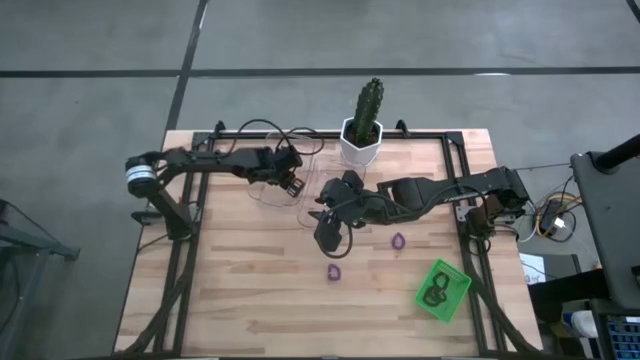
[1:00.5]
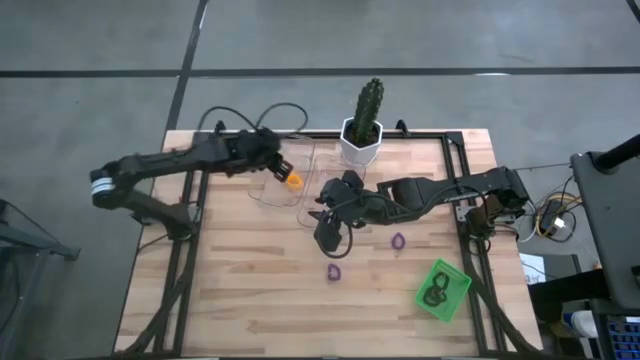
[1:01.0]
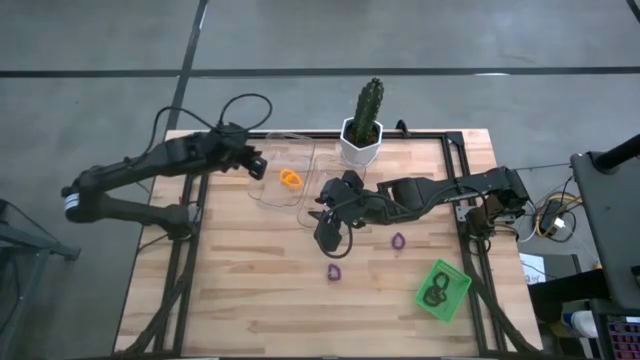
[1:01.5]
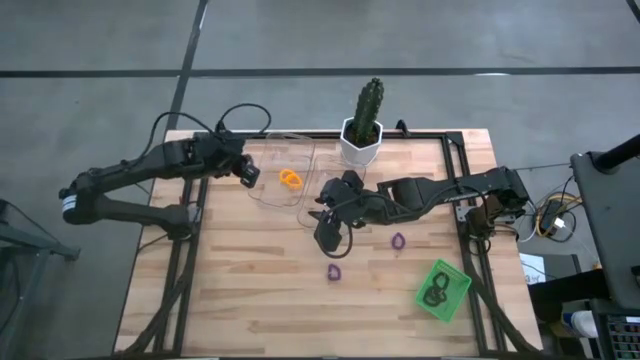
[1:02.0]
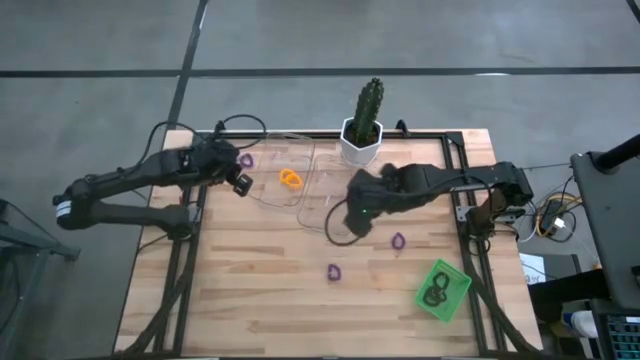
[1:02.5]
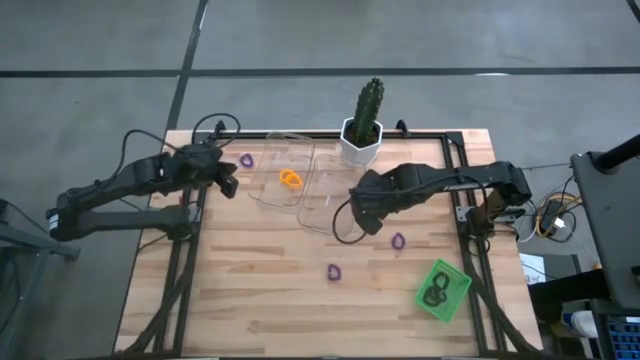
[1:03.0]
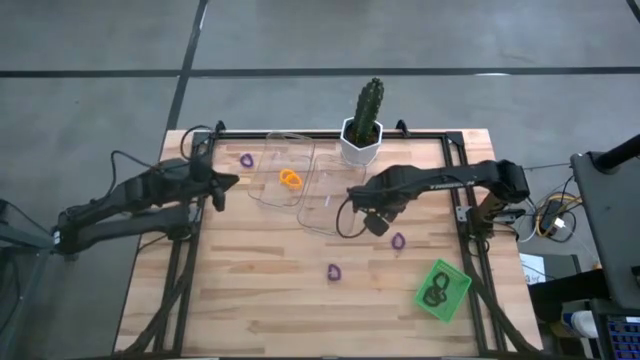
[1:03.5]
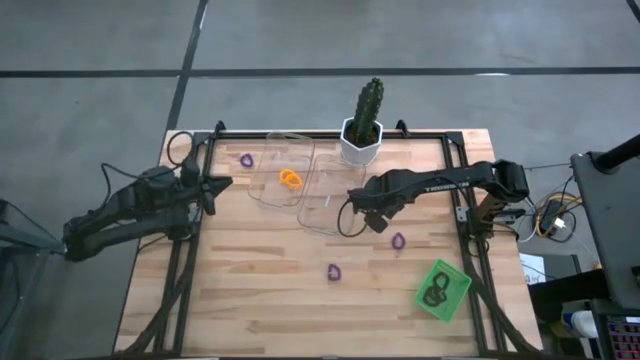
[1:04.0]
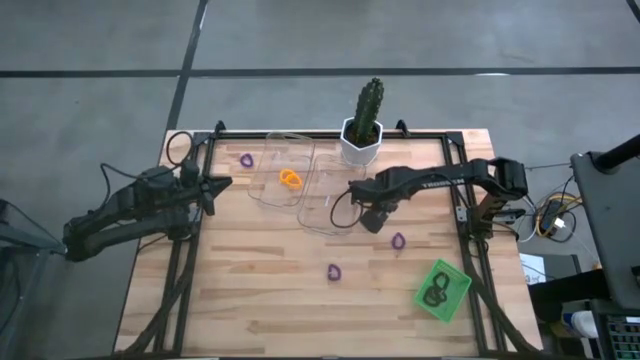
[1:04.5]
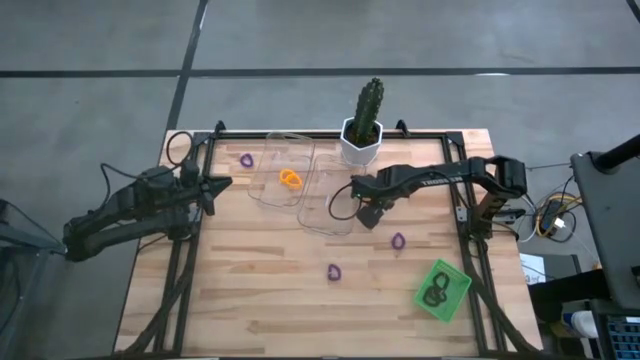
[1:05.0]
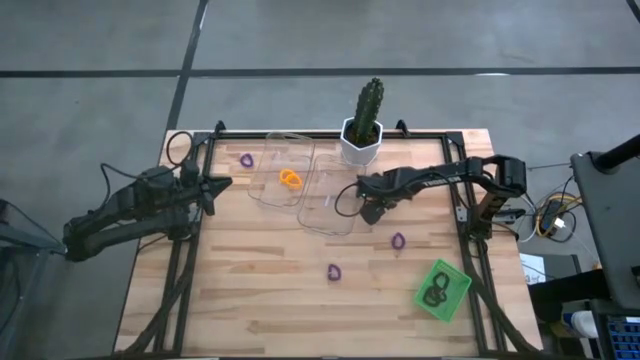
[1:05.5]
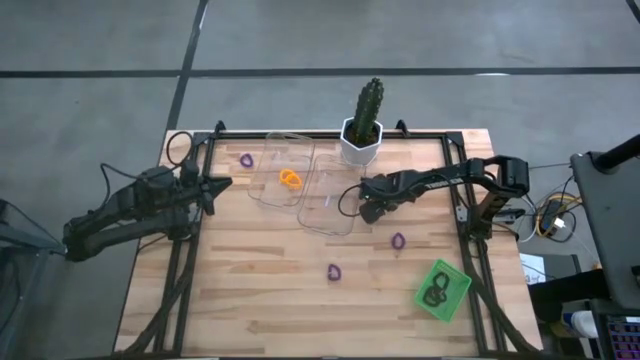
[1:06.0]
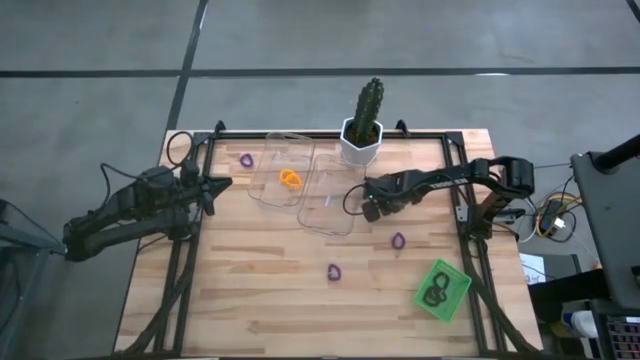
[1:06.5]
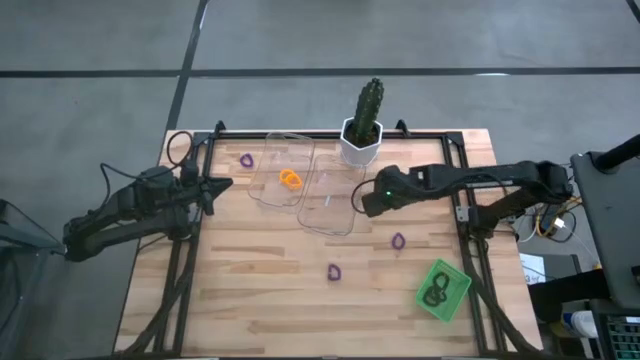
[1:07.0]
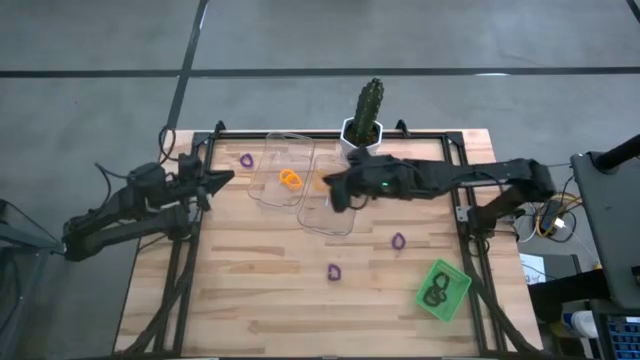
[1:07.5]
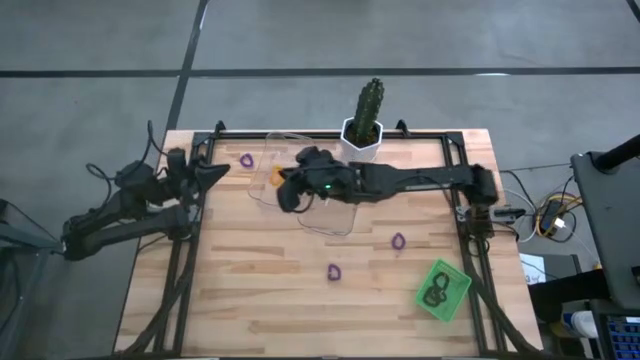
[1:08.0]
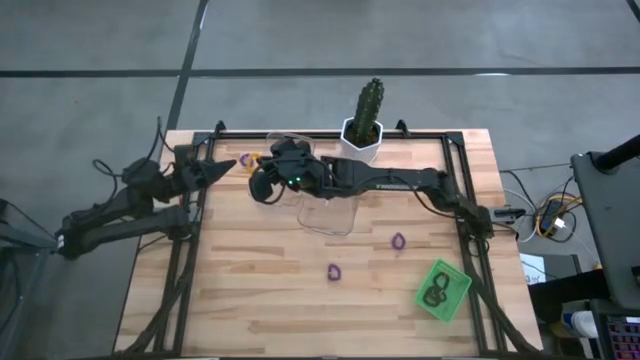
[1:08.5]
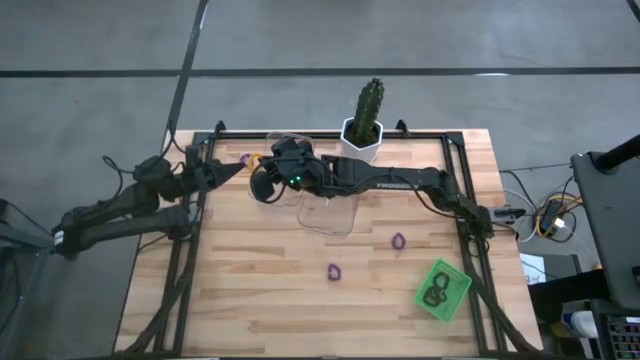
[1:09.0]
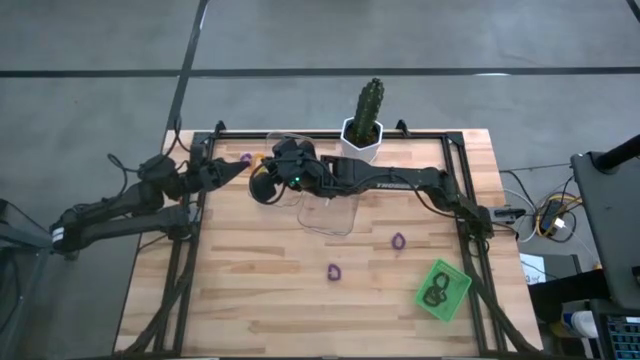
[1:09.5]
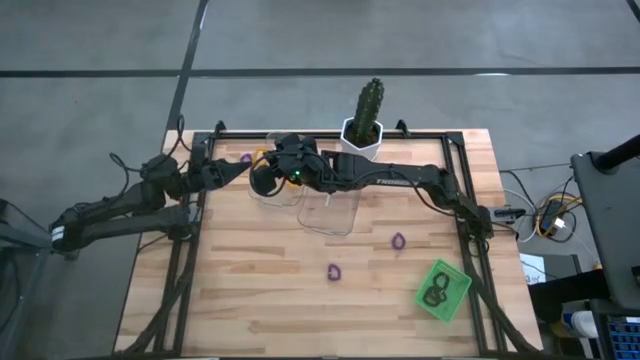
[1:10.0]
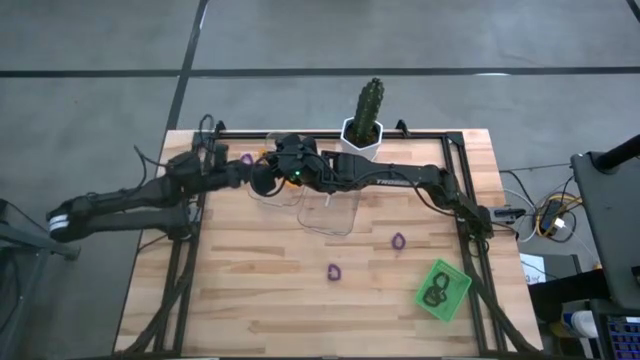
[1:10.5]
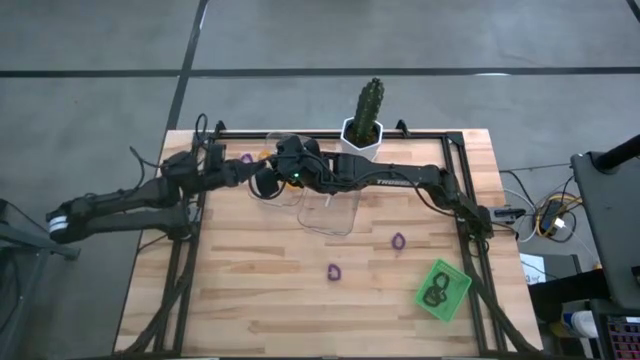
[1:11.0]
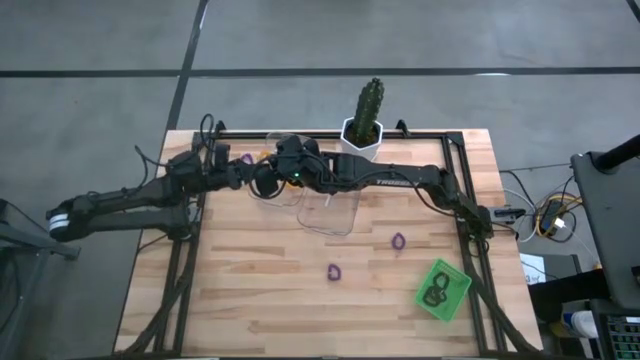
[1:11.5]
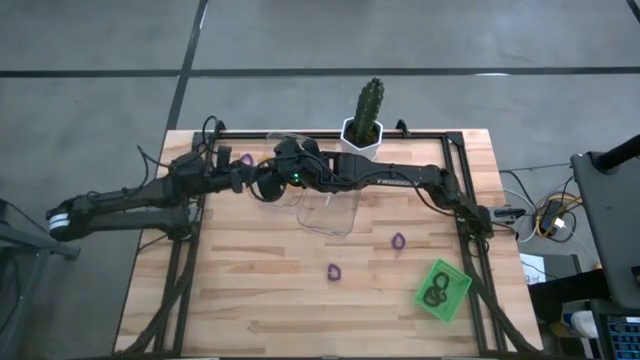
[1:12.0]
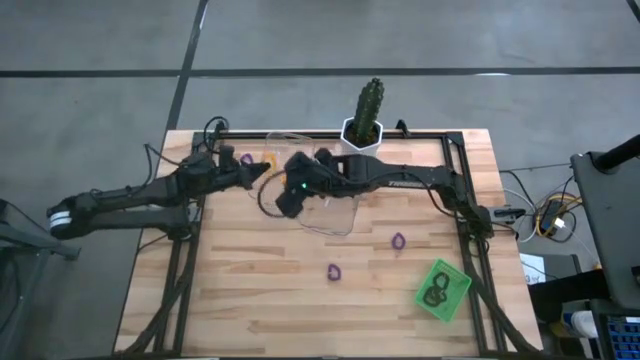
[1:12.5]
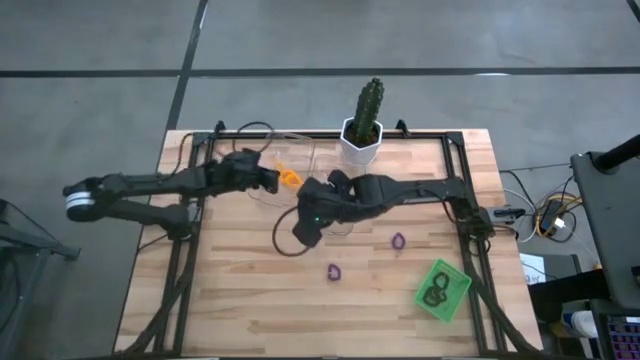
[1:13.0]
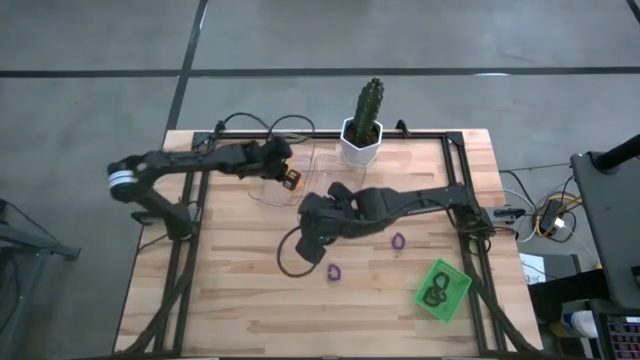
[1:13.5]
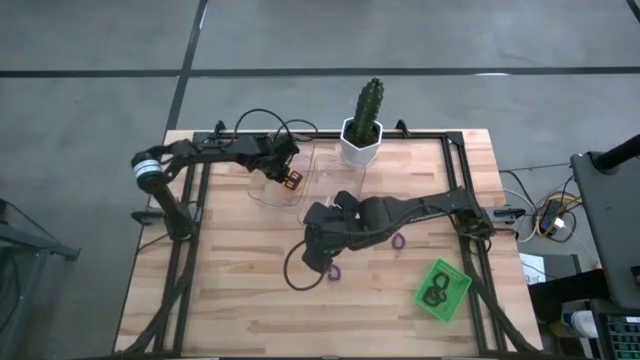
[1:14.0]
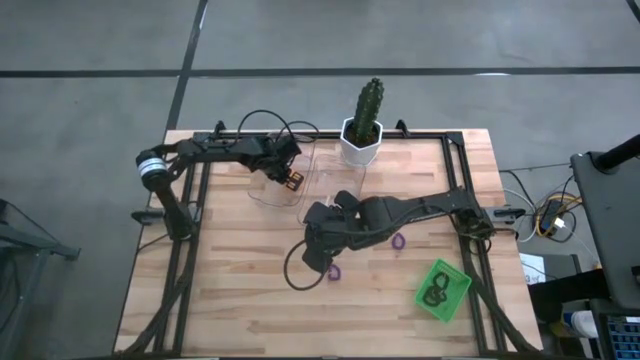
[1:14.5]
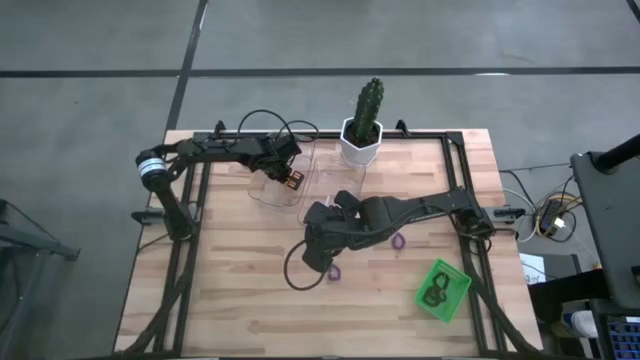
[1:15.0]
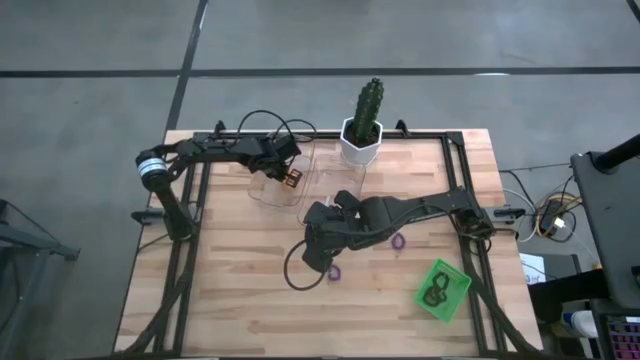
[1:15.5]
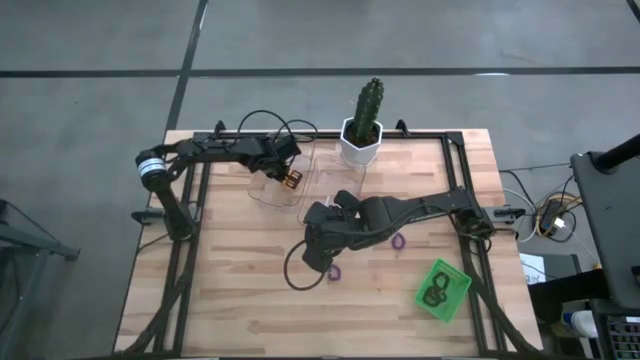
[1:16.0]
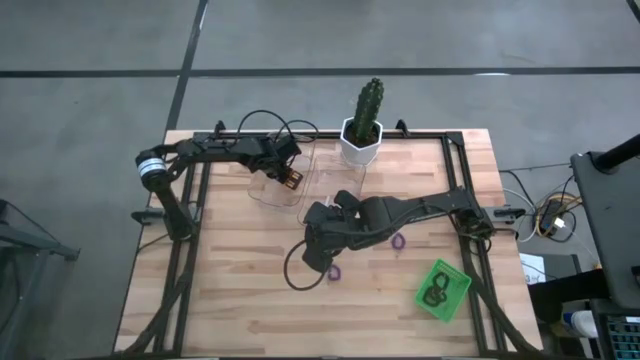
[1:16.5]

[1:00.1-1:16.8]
Task: Sort spring keychains
Put the yellow spring keychain into the left transparent bin

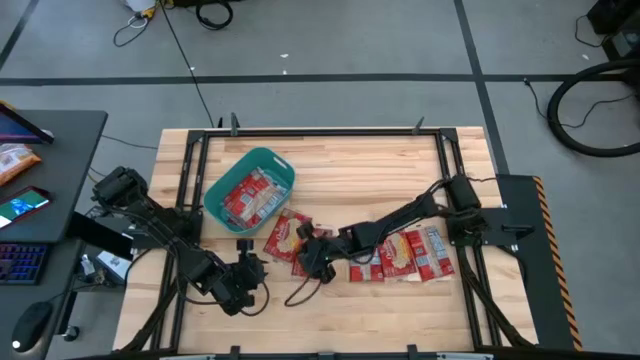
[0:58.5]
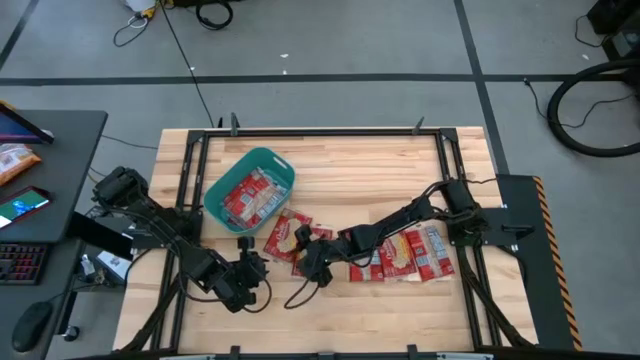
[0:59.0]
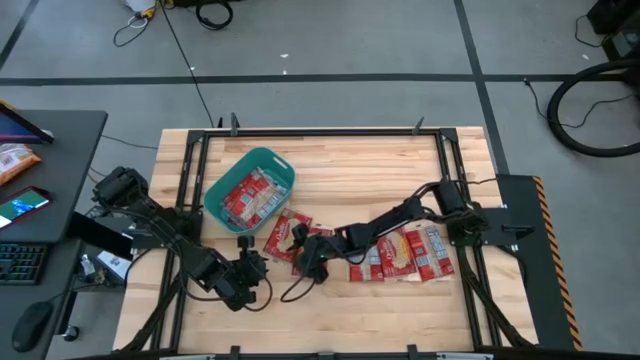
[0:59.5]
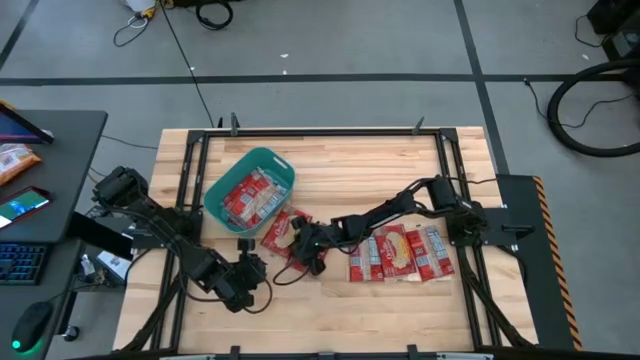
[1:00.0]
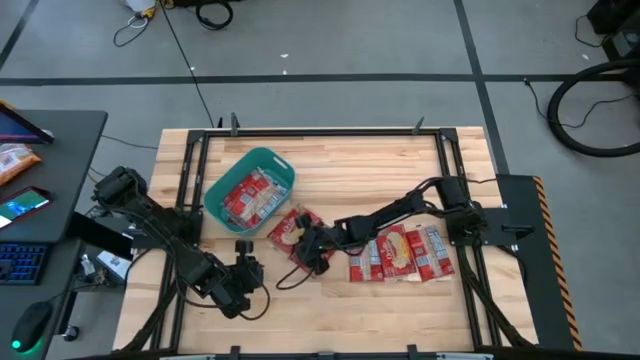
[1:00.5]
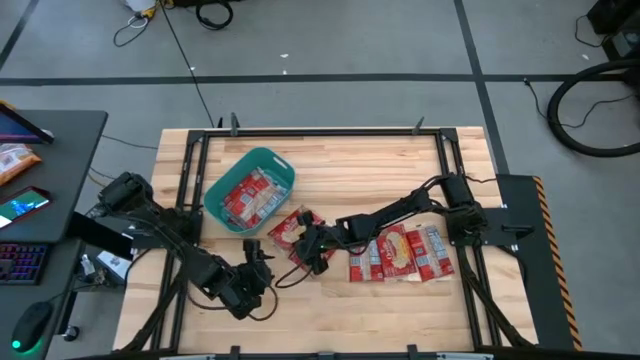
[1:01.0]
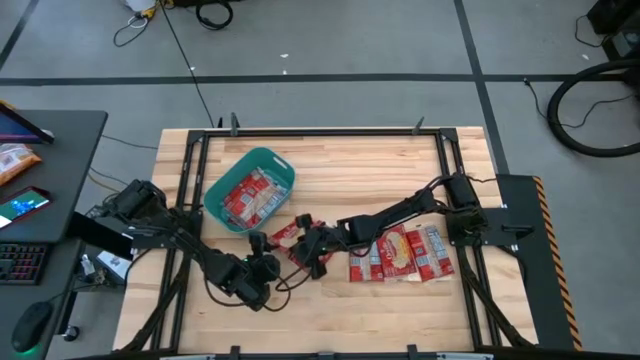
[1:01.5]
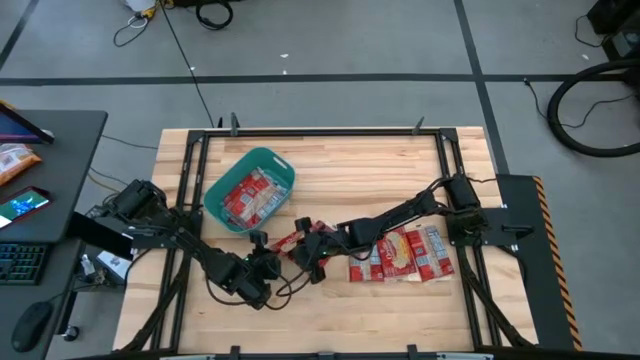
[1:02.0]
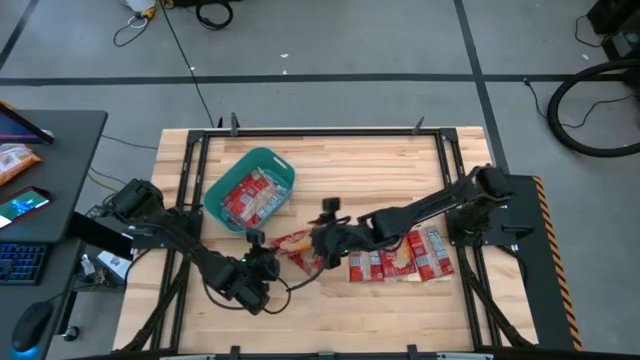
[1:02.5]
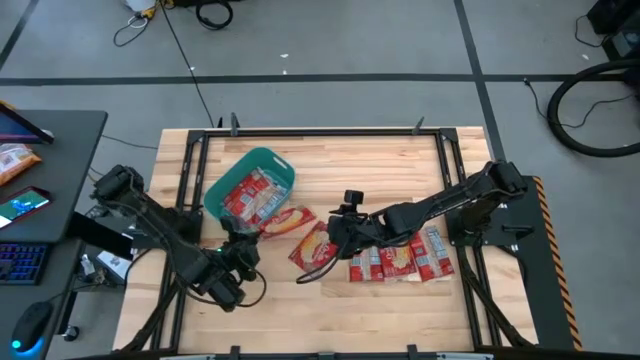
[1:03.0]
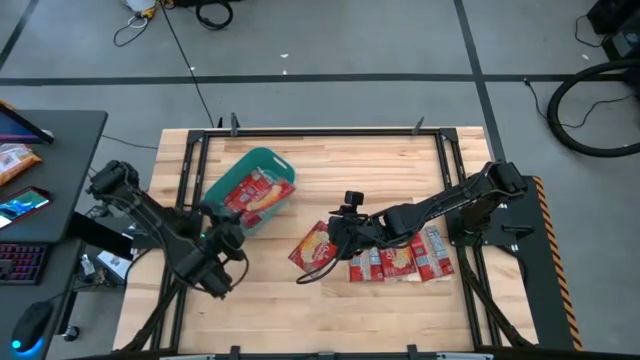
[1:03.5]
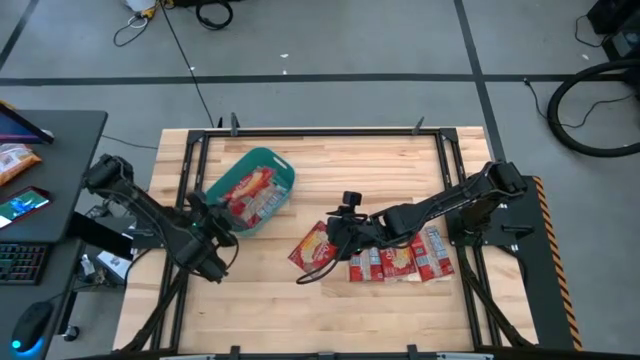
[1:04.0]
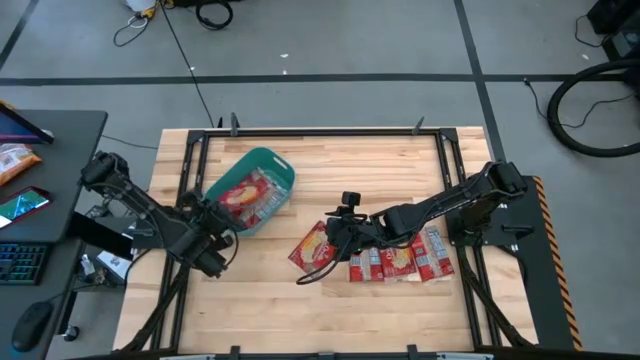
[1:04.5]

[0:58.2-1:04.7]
Task: Sort popcorn bags into baskets
Put the red popcorn bag into the green bin
